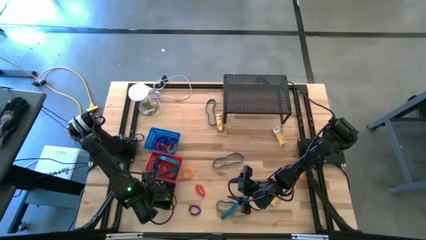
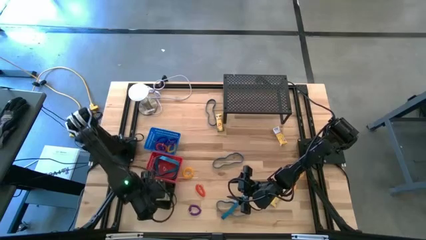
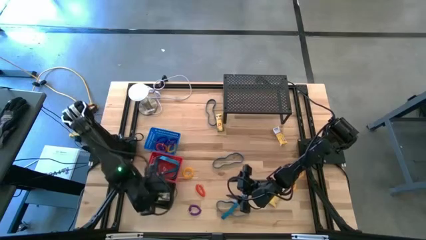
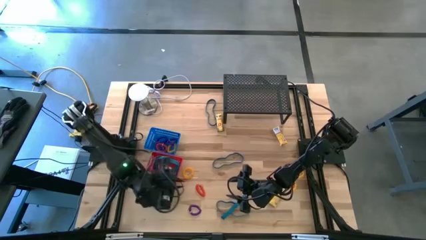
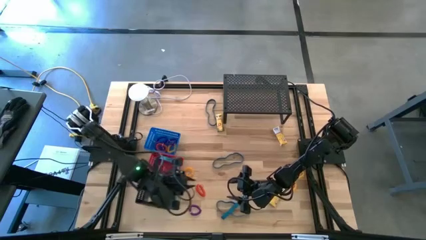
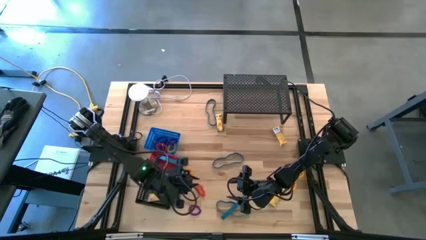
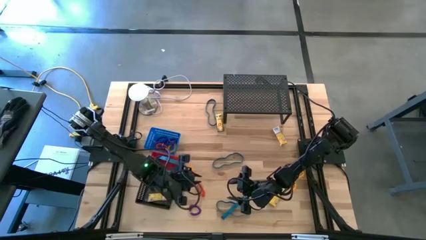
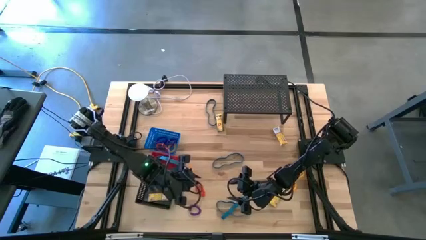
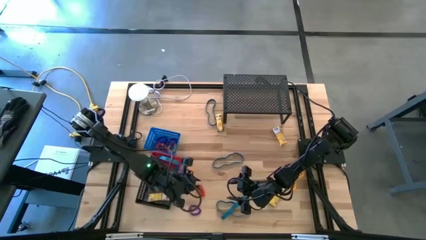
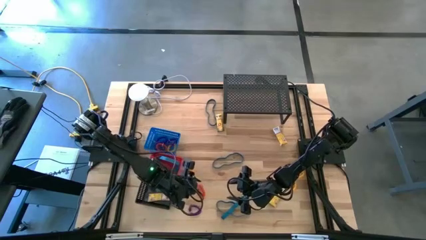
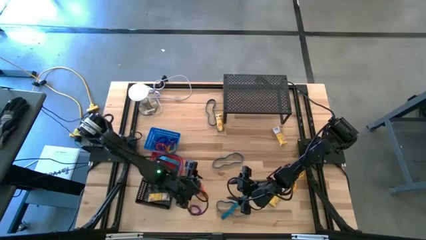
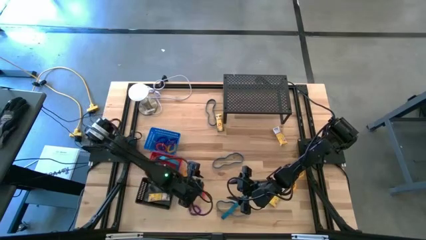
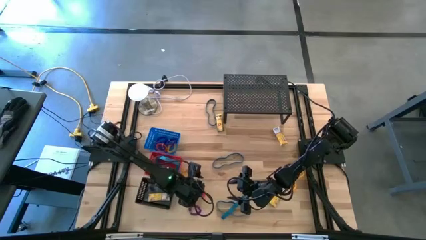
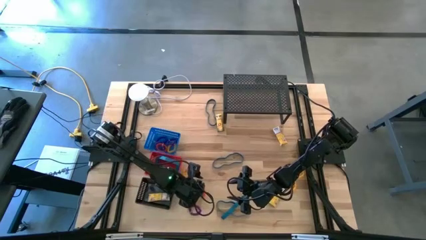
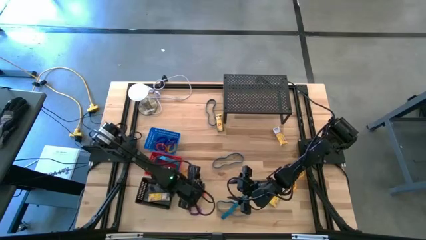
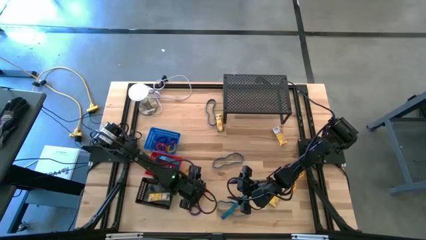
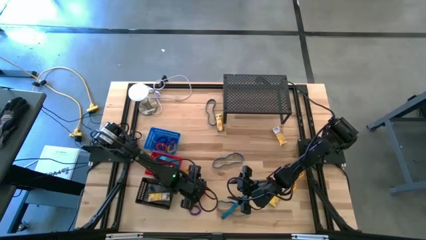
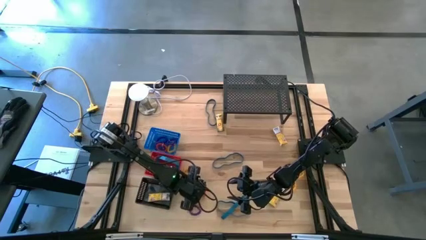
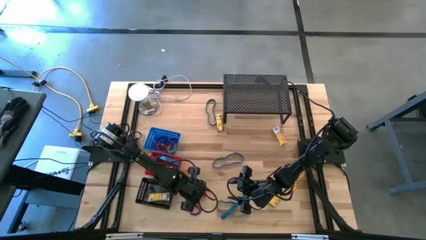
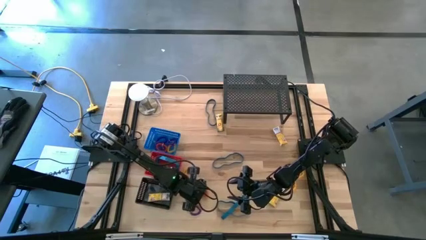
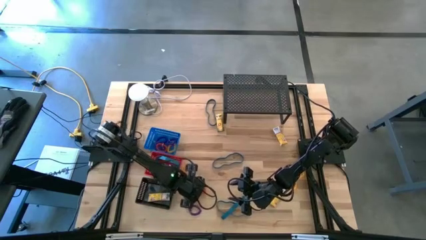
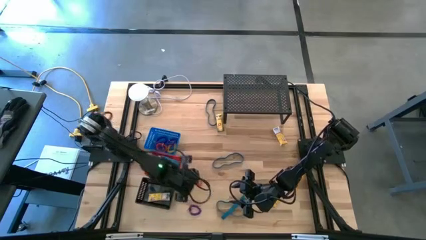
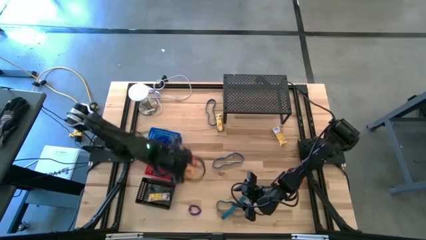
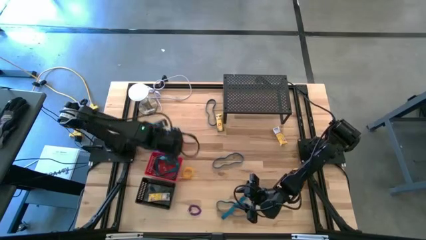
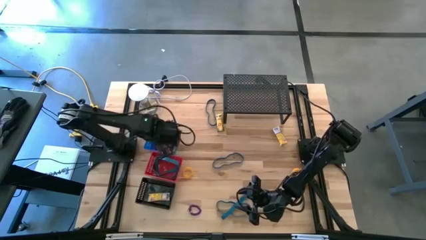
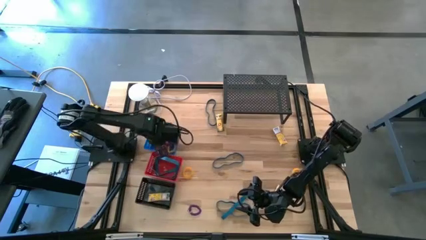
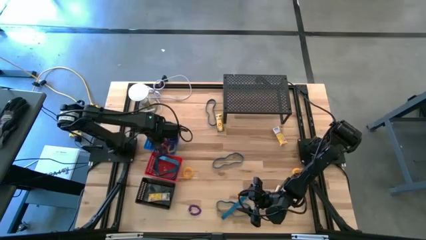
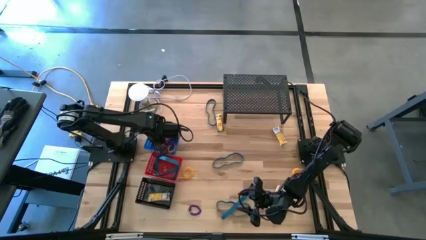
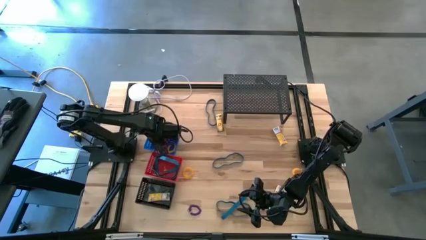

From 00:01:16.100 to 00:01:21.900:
Task: Pick & Place Office Desk Supplies
Put the orange spring keychain into the blue bin

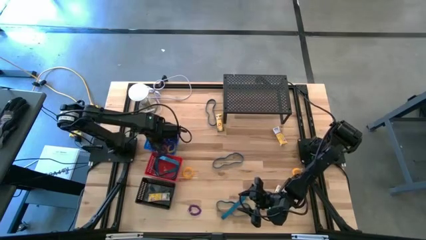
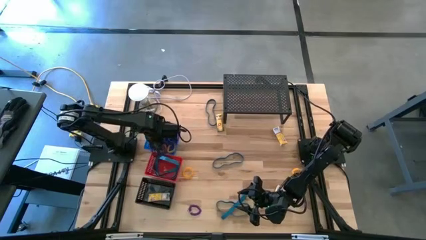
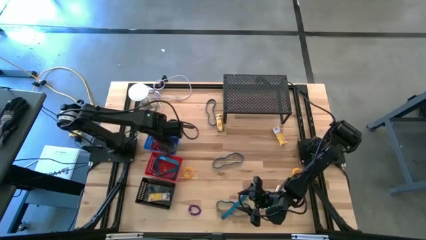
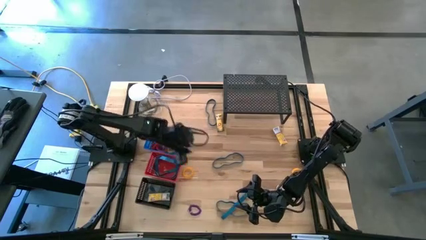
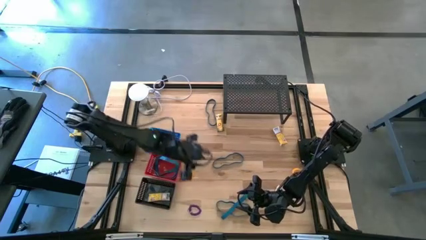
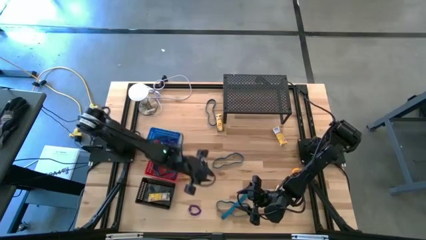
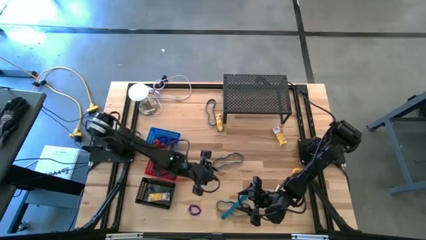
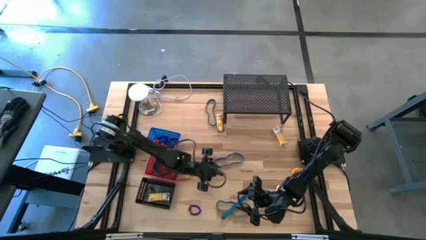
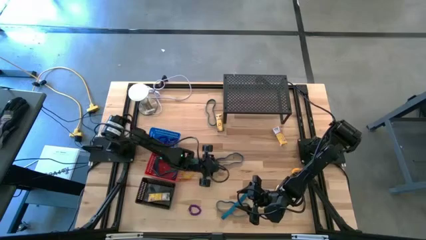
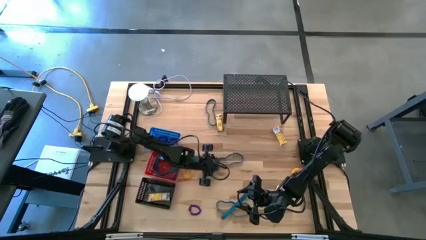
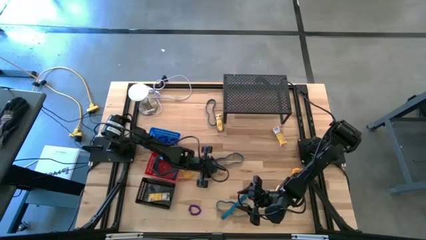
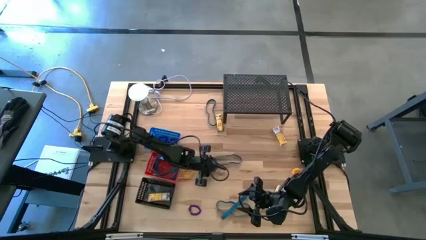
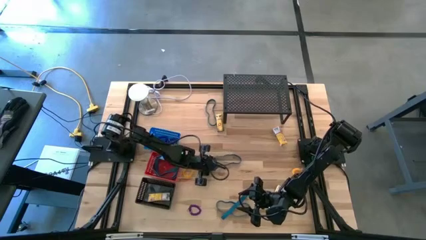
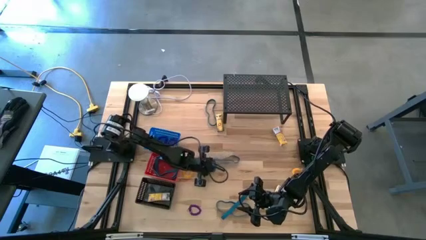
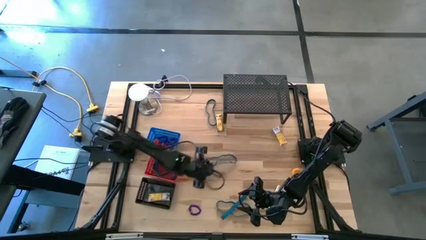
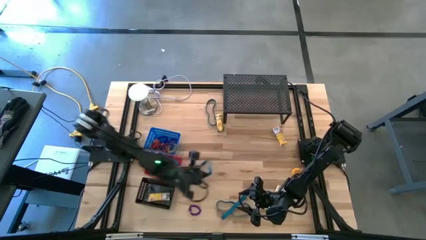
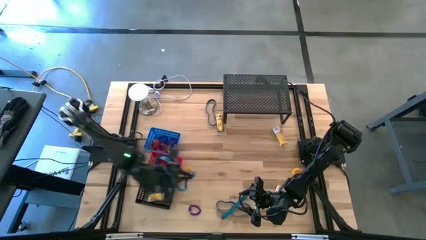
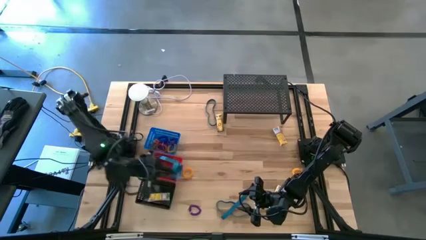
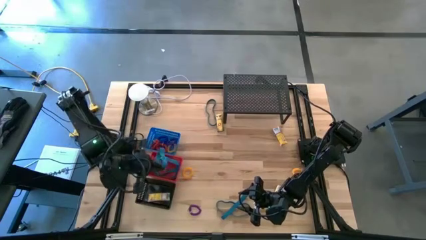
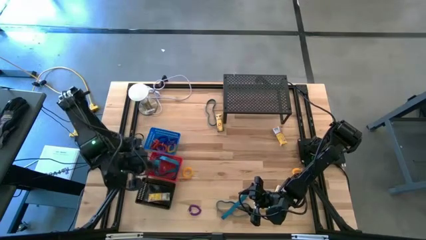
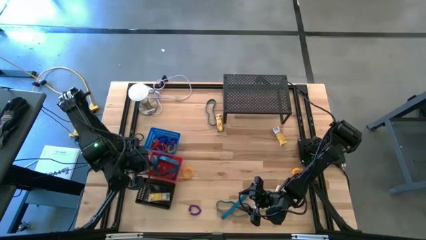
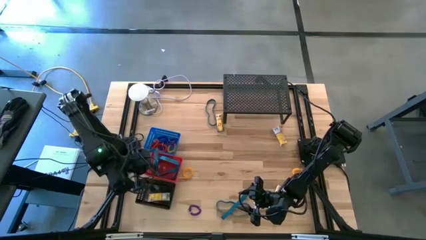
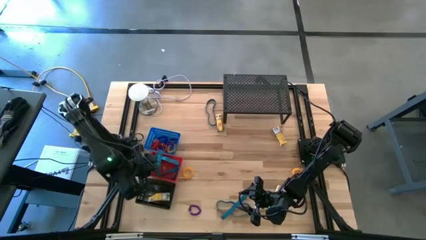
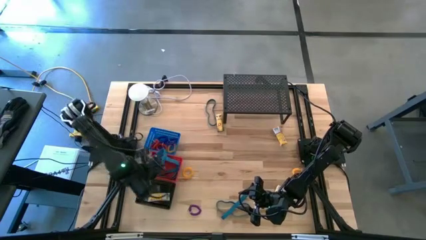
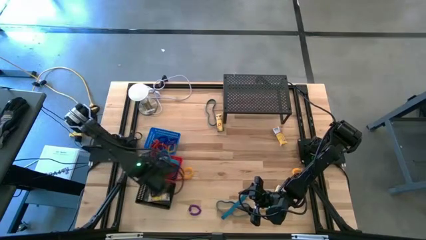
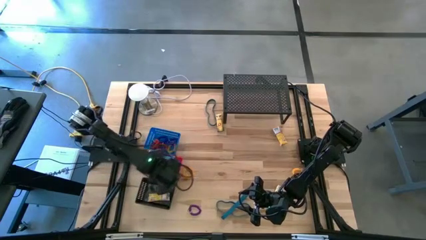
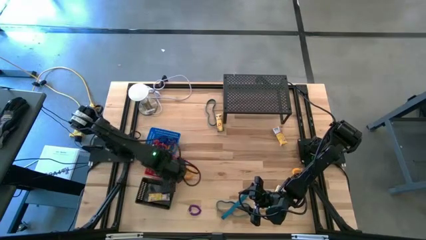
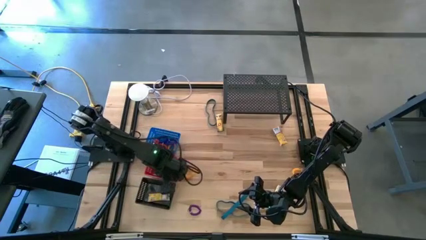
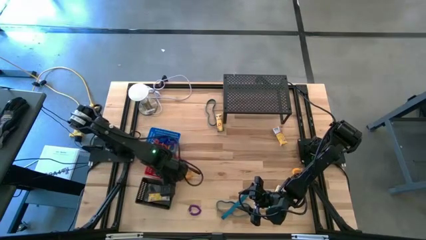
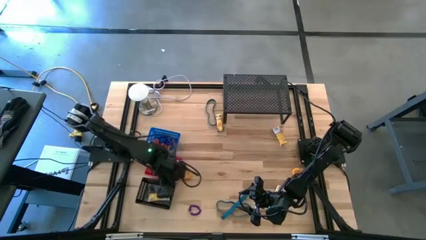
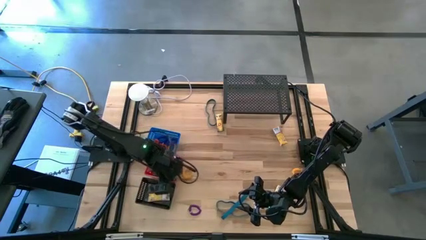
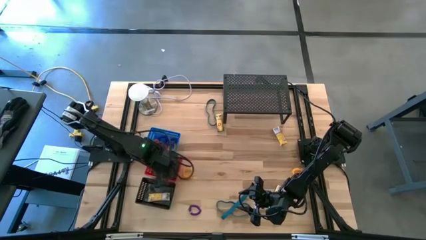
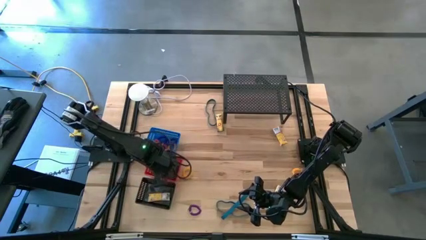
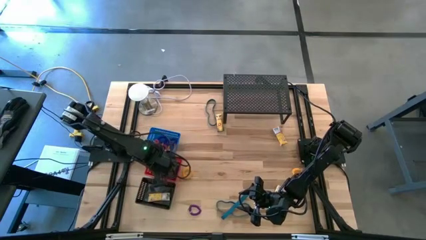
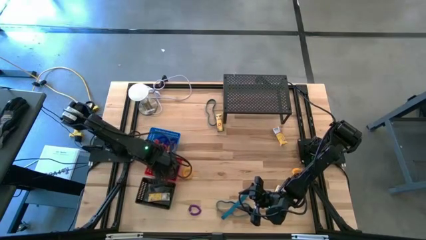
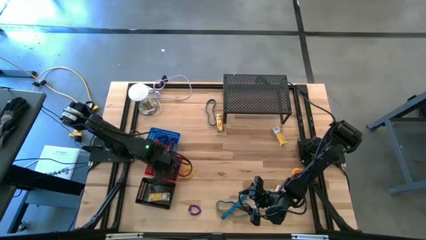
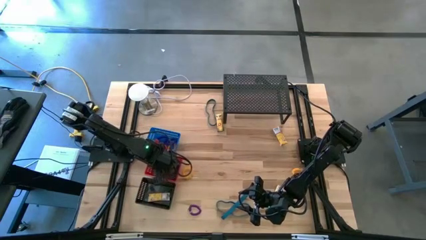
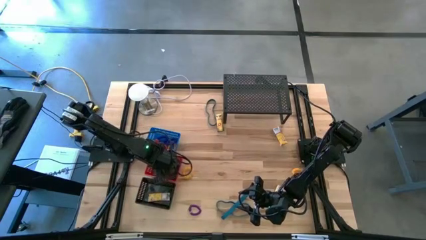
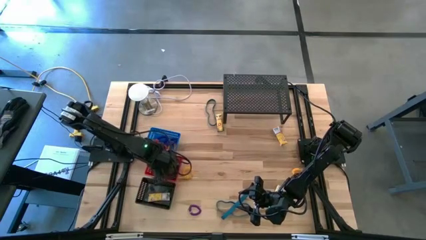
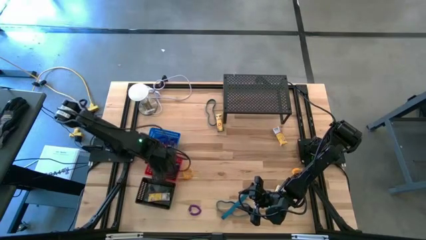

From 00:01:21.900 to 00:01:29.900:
Put the blue rubber band into the red bin

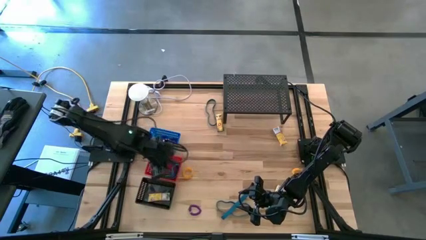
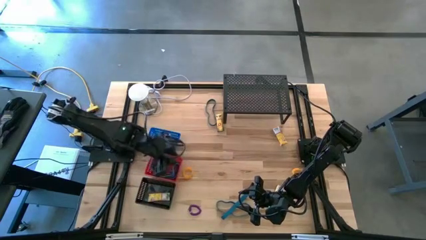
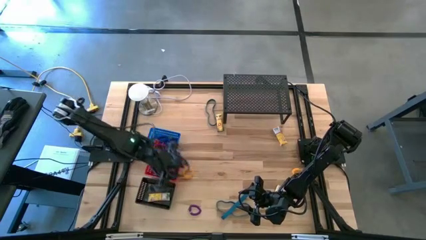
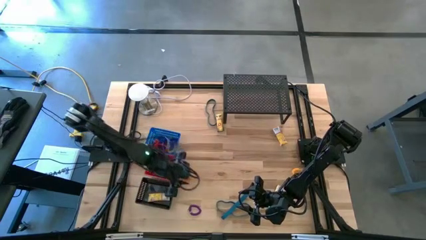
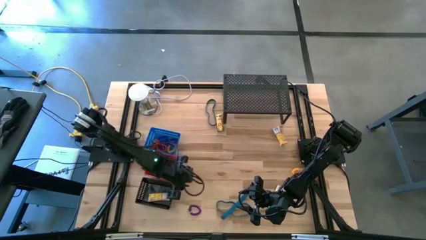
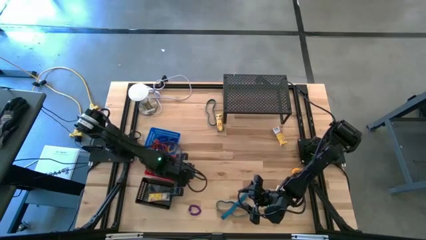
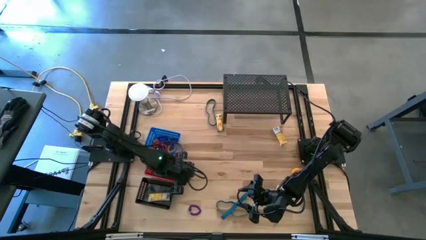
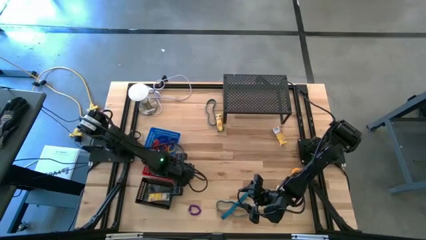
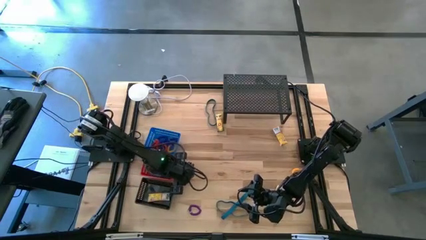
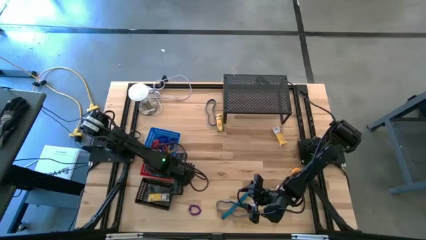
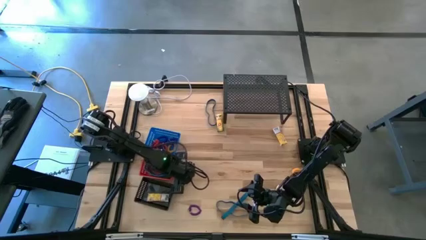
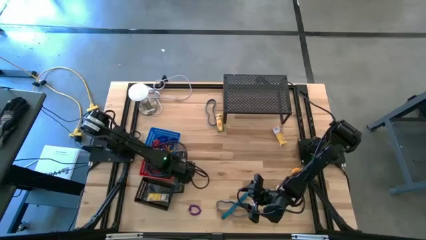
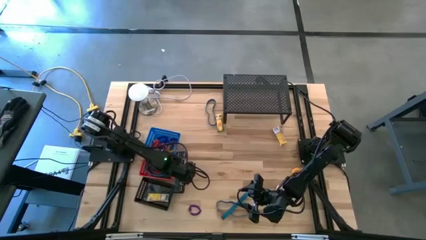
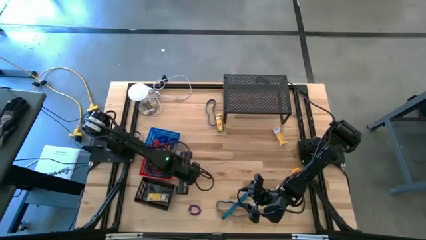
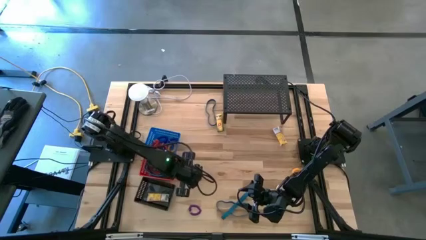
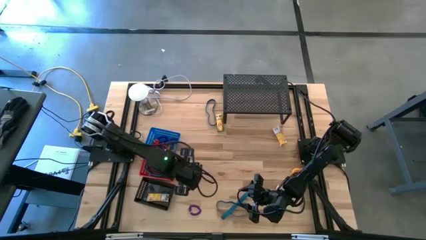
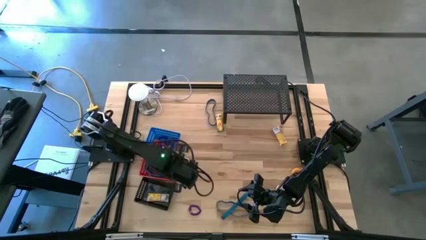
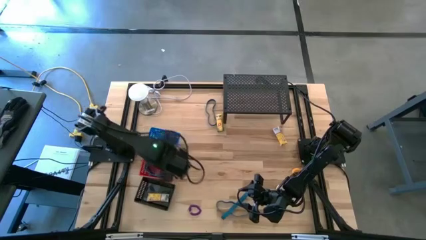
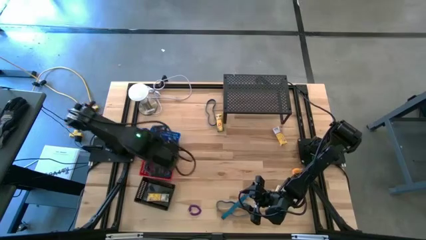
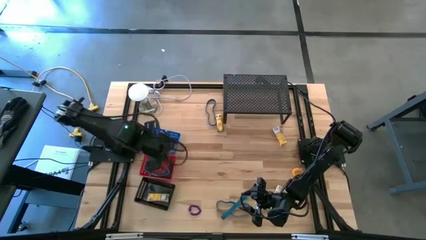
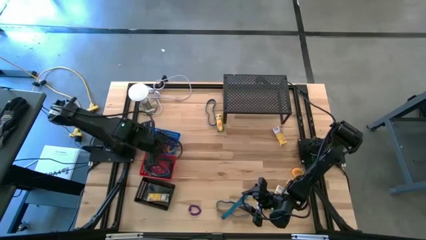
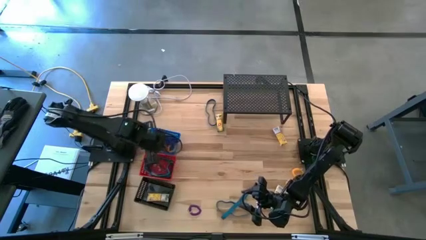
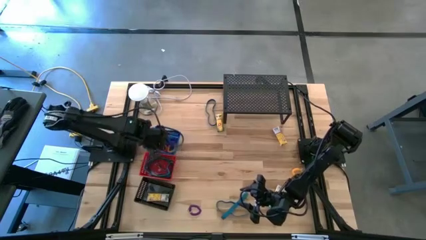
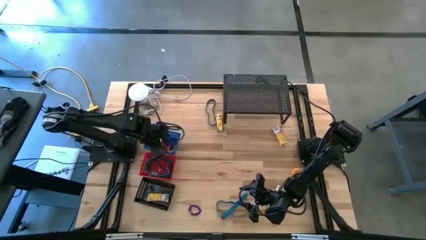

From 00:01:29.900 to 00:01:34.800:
Put the yellow spring keychain into the blue bin
